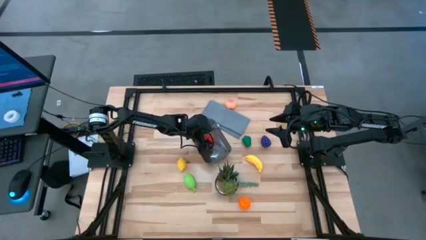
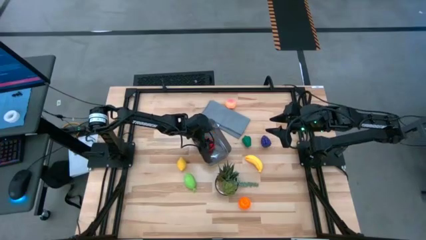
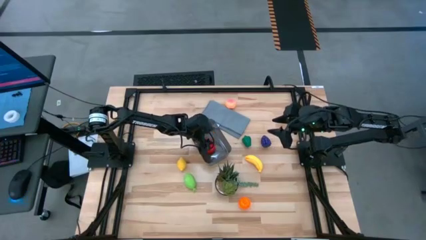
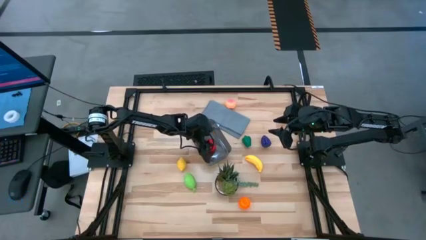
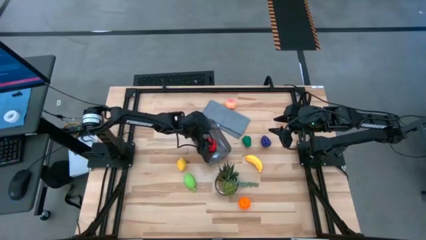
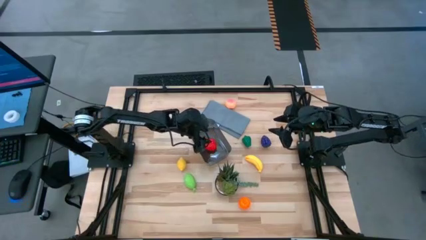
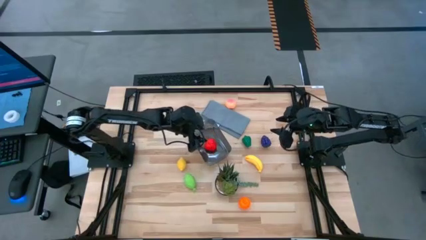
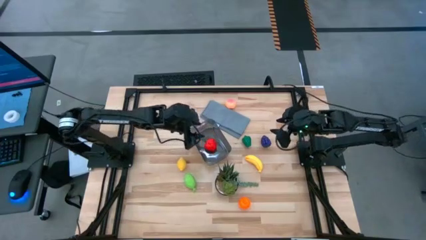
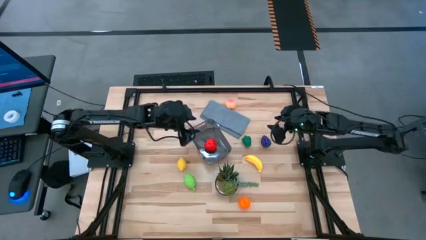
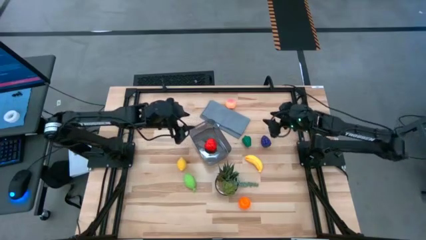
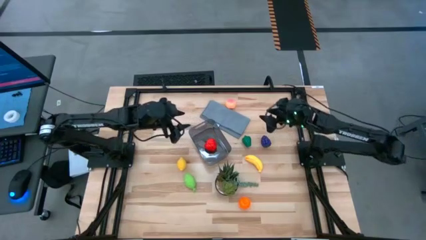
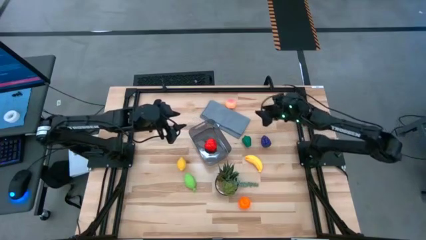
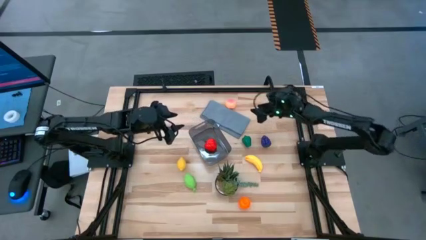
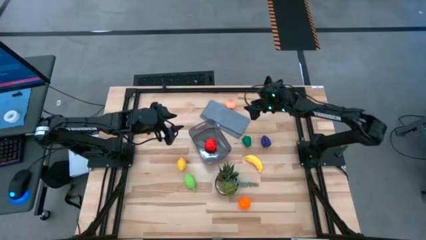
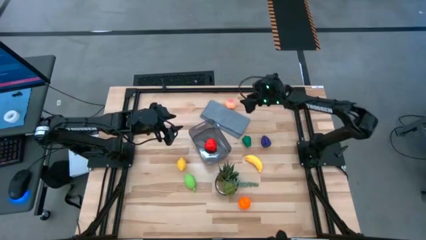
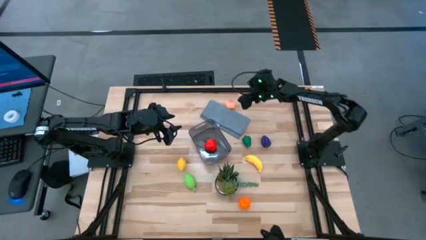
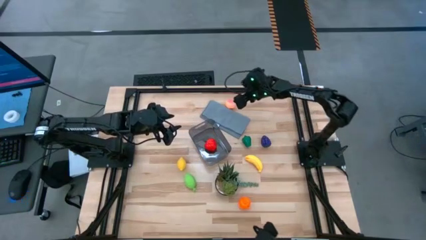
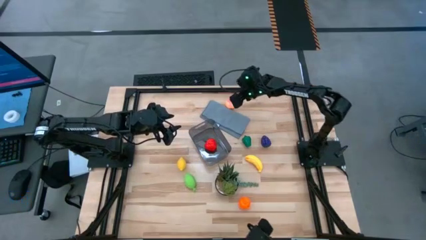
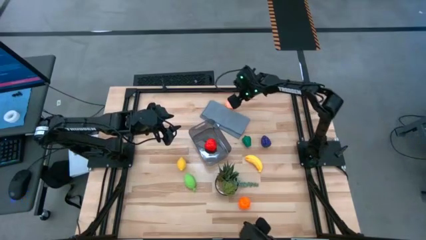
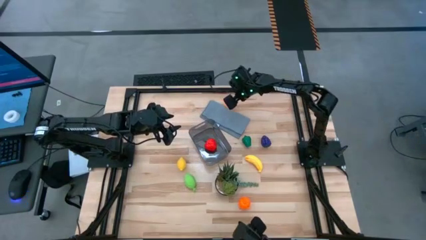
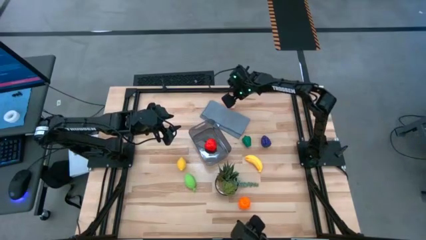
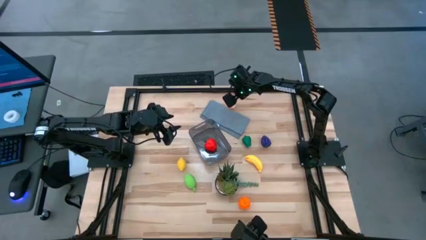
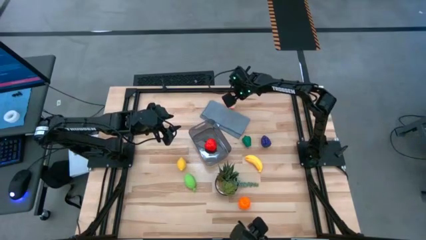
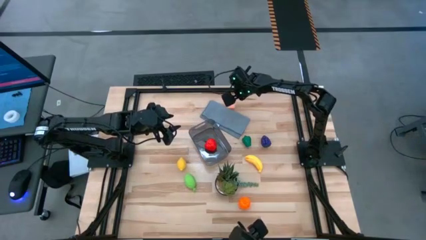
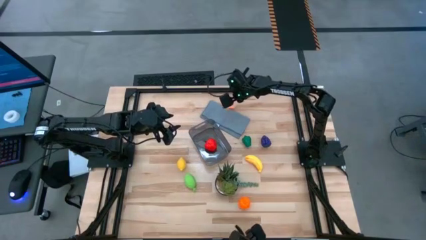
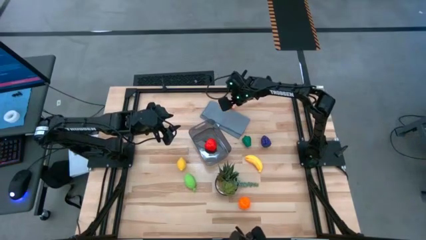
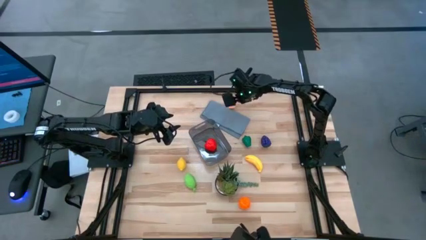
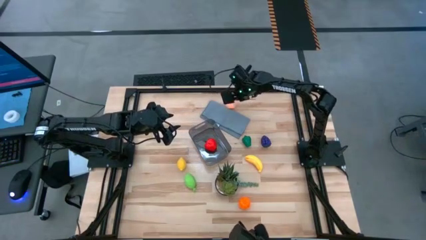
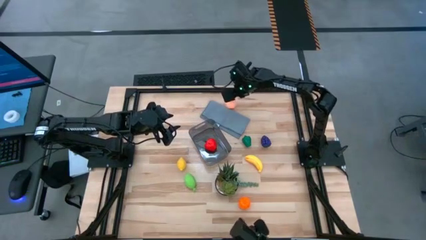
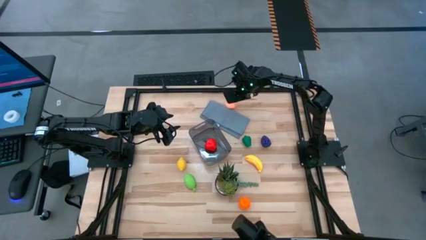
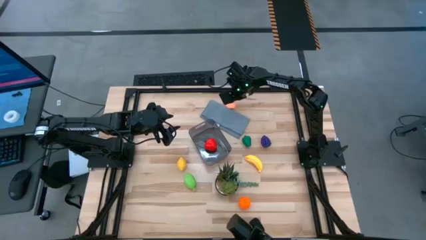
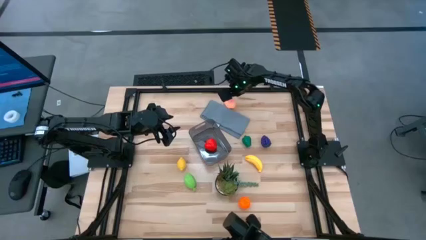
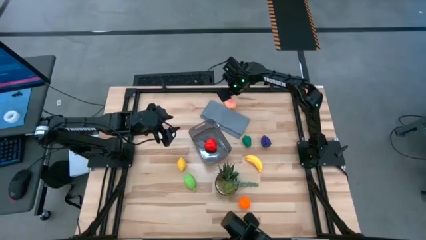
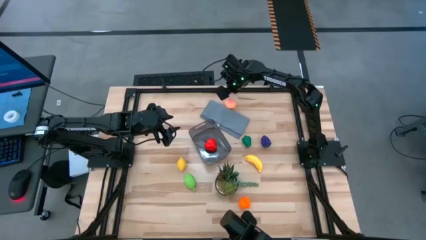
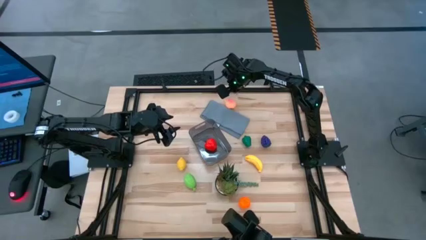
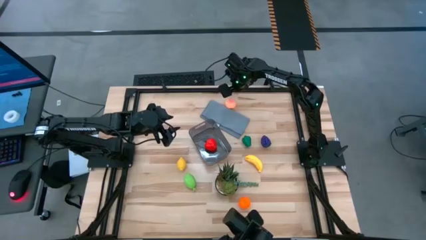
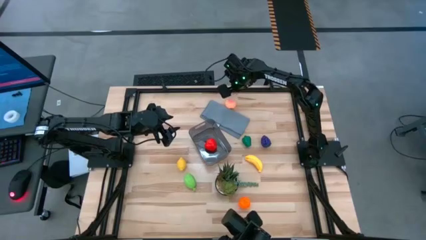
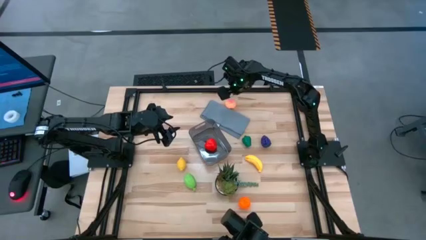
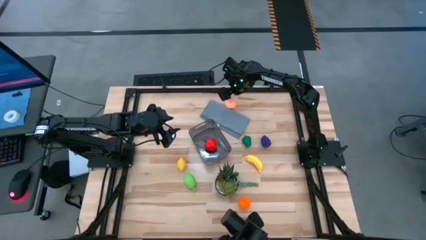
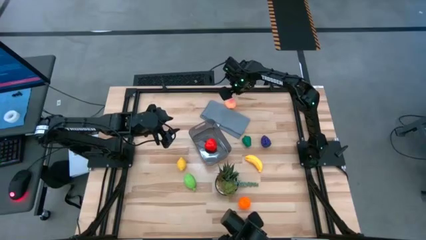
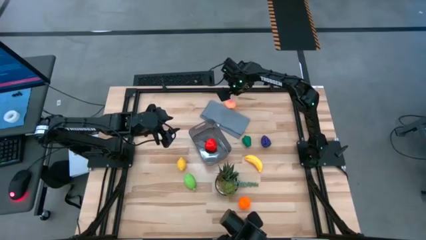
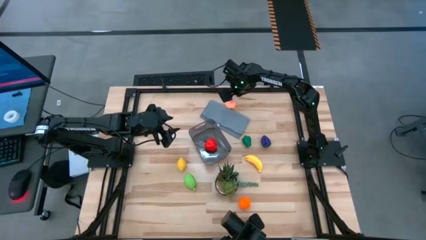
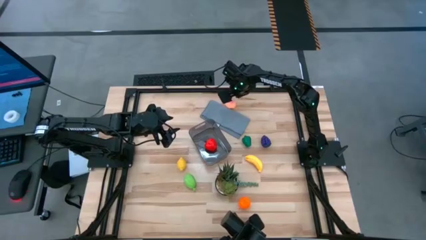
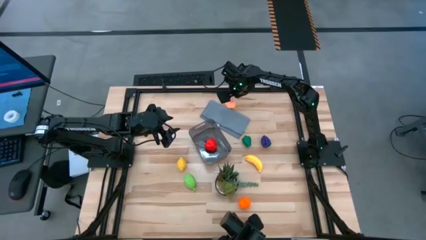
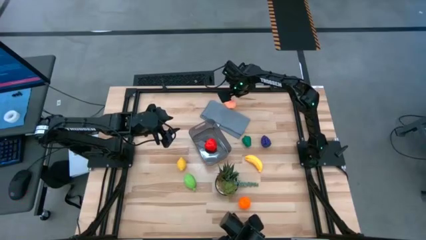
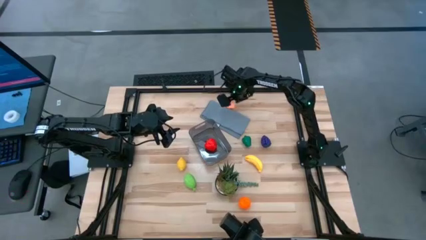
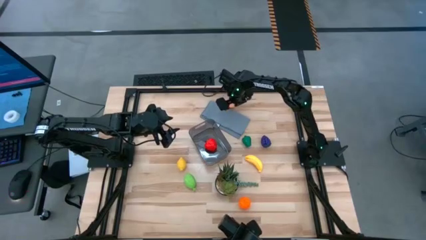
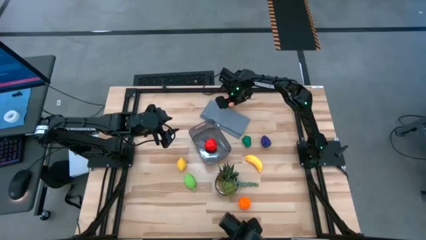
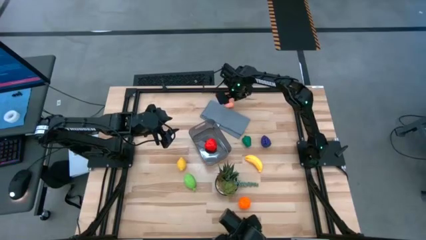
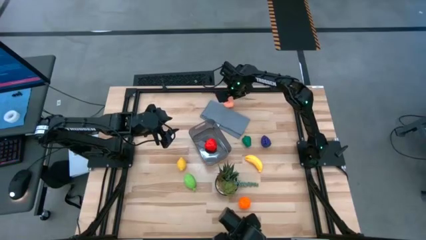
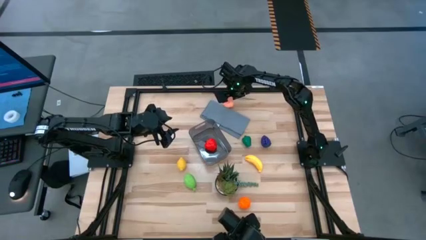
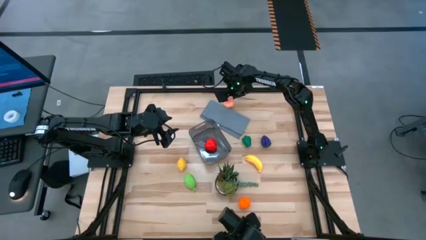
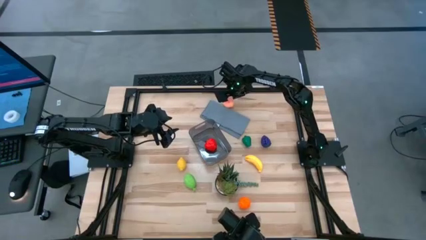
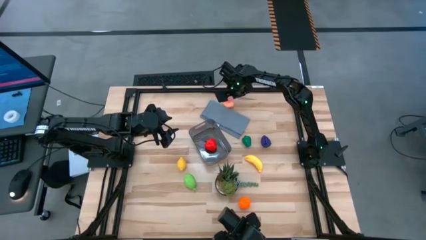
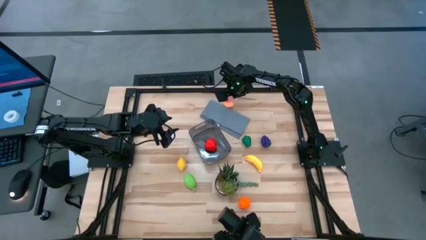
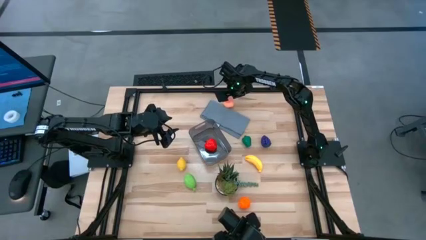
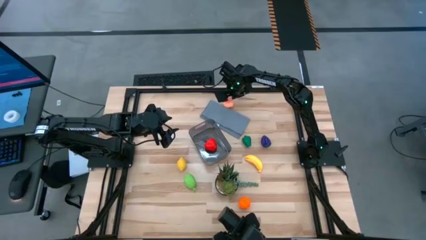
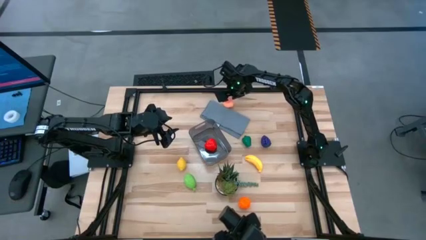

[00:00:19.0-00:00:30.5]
Task: Pick and placing Produce into tupperware
Put the pink peach into the black bin

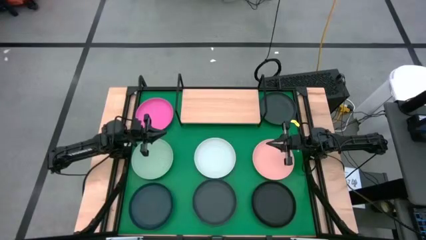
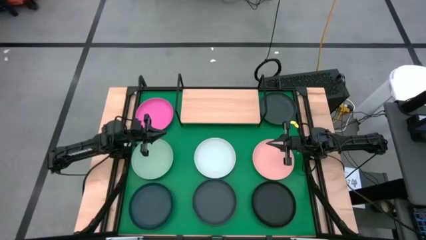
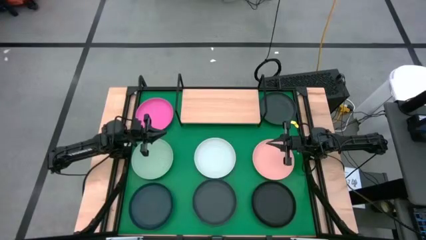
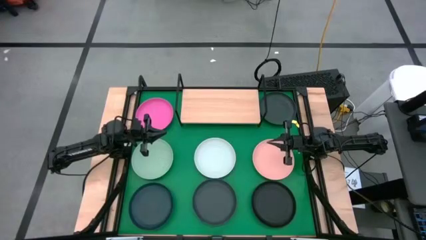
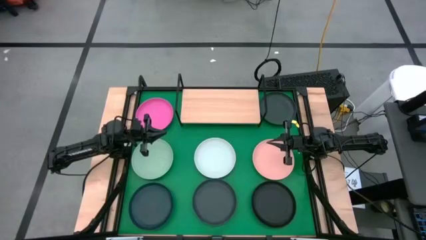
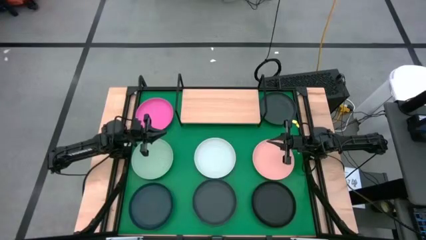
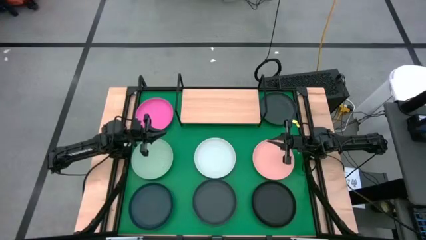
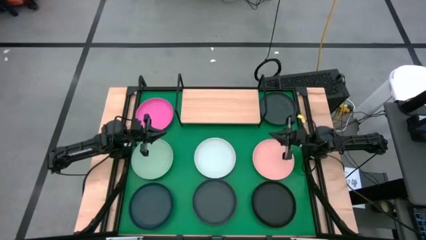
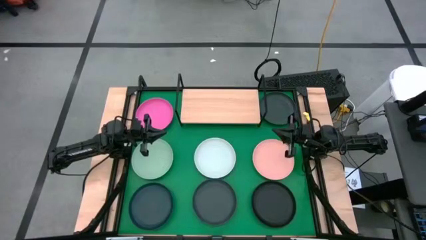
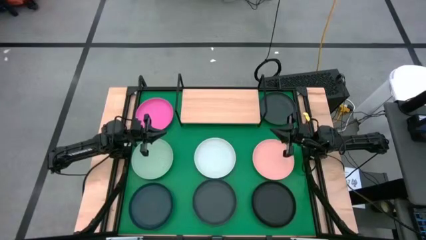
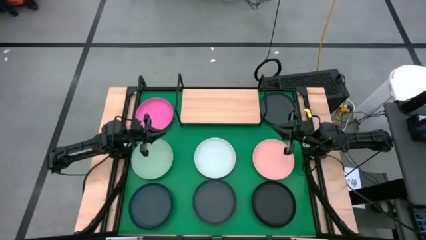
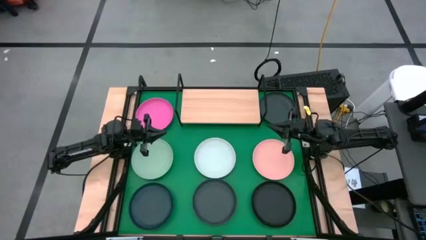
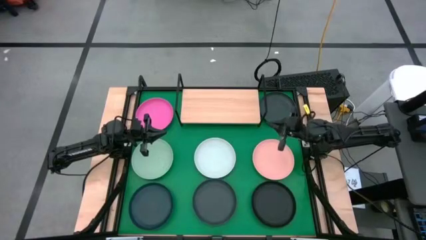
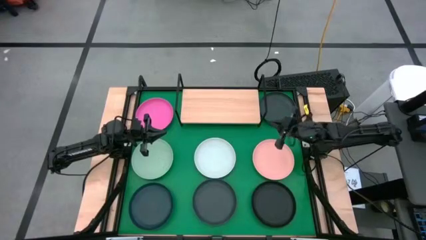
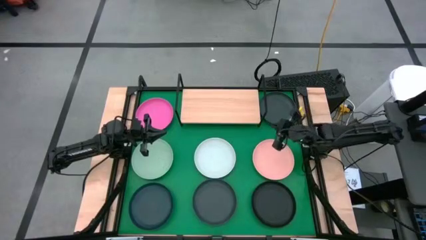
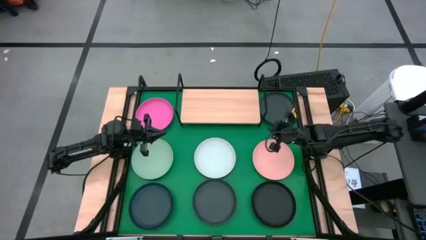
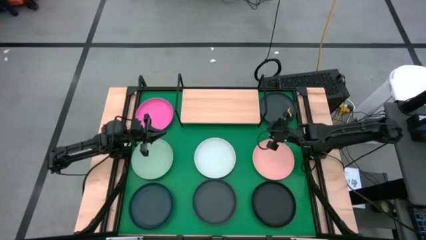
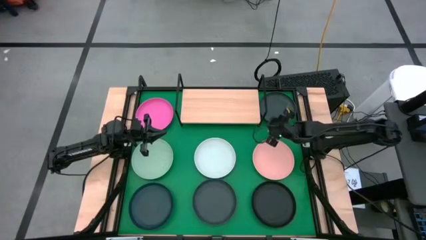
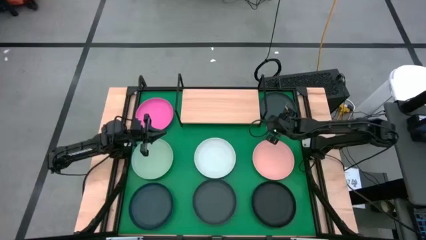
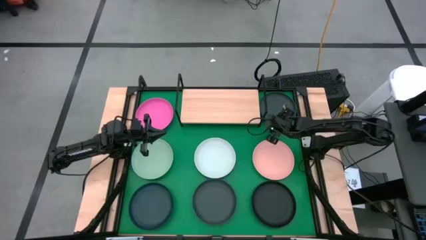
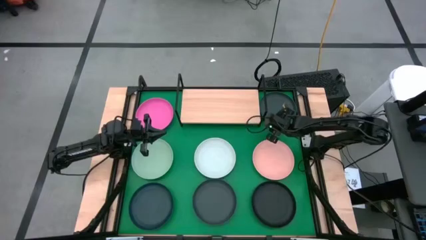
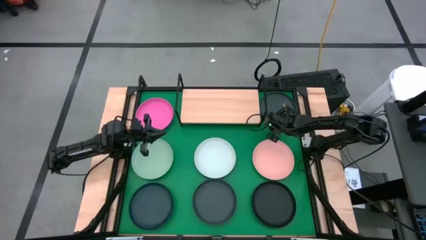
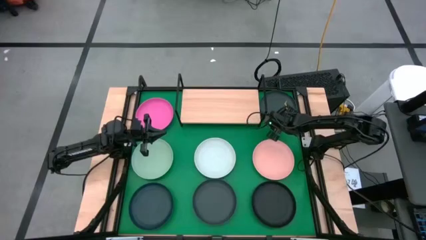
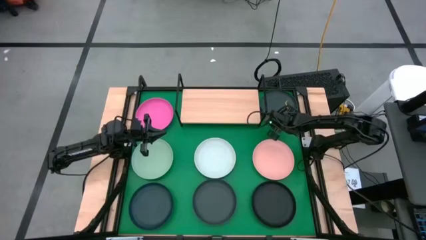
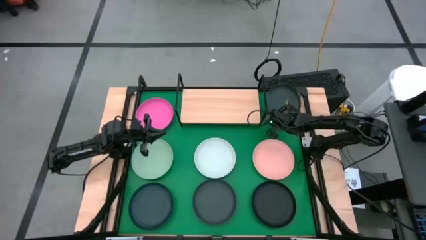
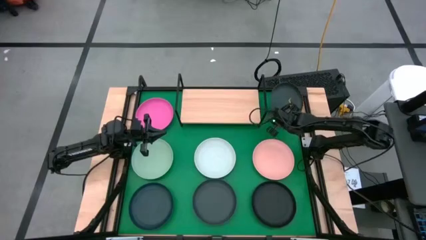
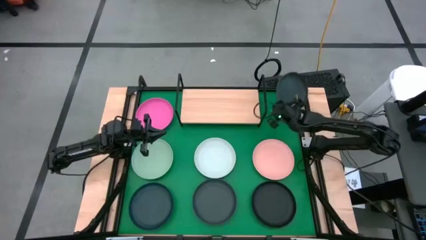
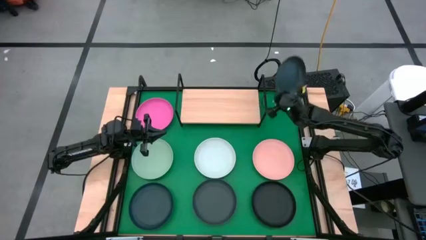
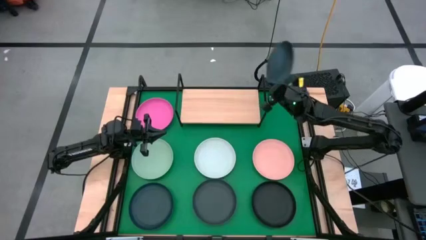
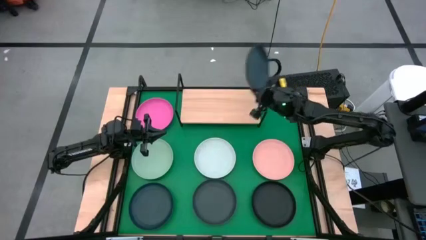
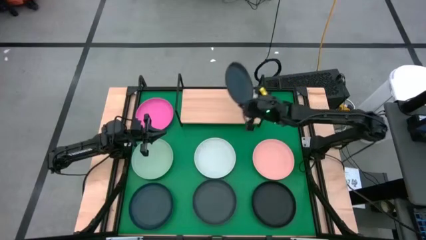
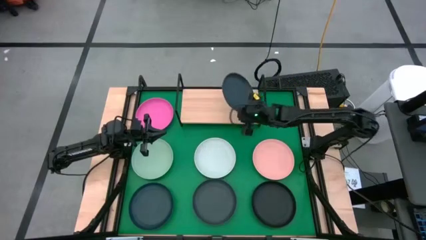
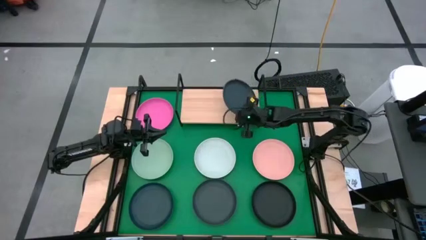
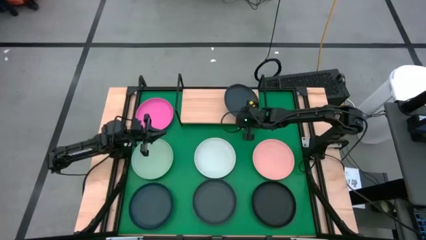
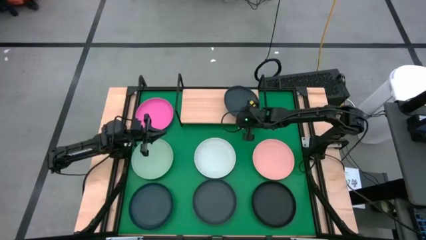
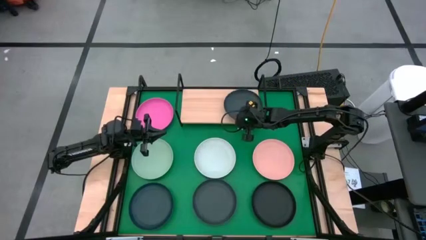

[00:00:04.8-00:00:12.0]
Task: Place and stack plates onto a shelf
Put the top black plate on the shelf
